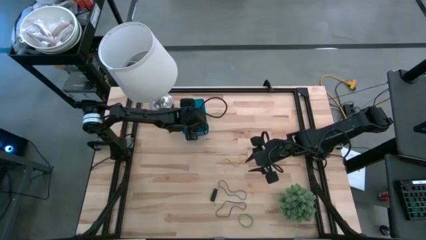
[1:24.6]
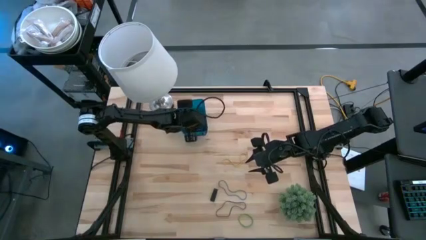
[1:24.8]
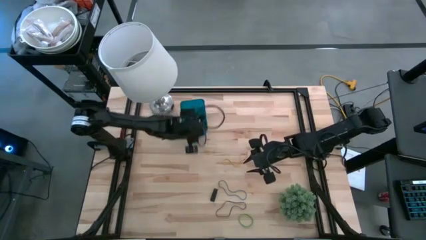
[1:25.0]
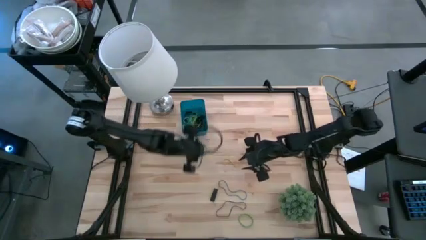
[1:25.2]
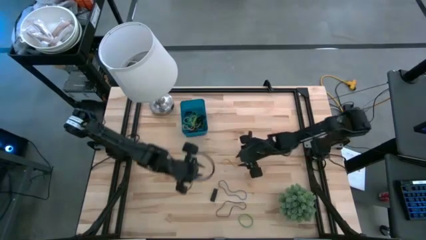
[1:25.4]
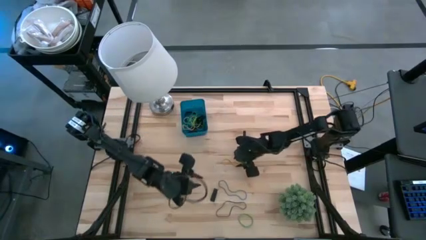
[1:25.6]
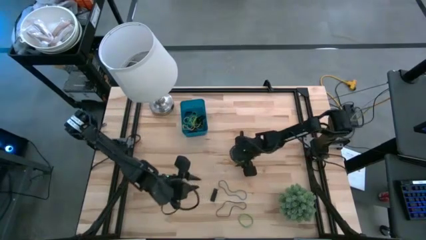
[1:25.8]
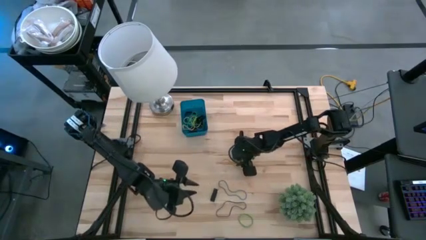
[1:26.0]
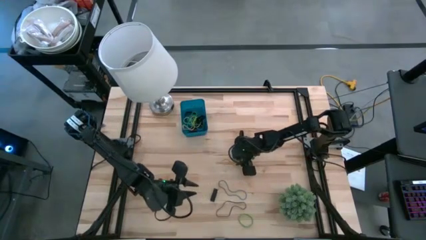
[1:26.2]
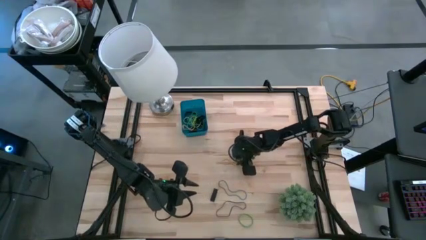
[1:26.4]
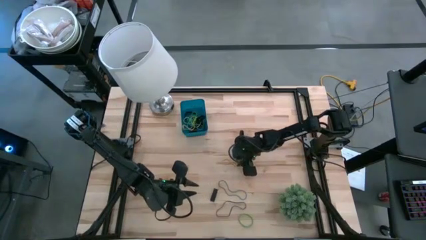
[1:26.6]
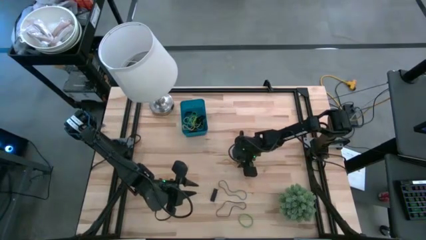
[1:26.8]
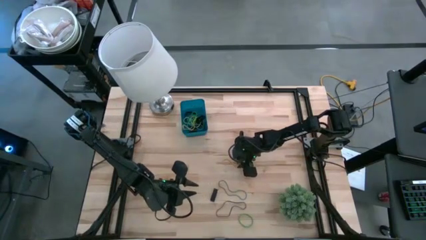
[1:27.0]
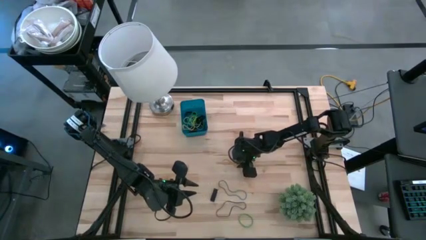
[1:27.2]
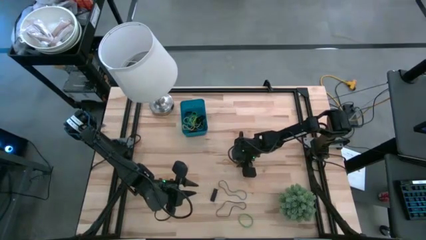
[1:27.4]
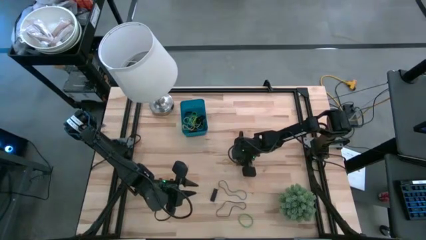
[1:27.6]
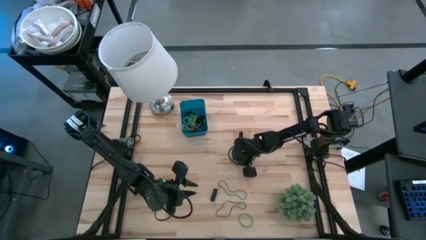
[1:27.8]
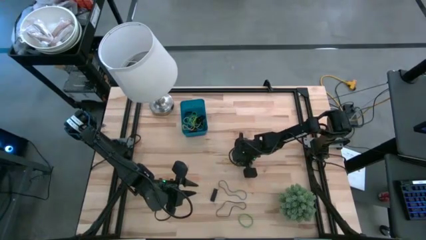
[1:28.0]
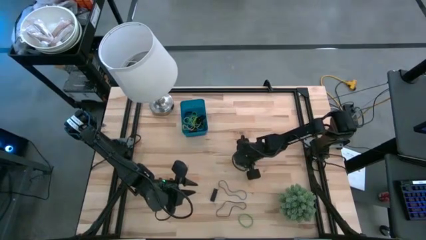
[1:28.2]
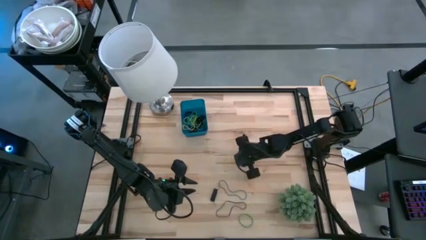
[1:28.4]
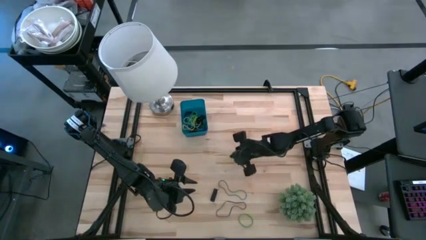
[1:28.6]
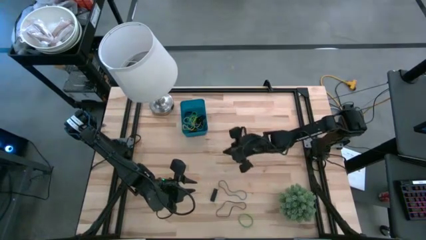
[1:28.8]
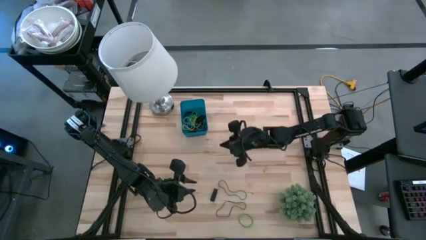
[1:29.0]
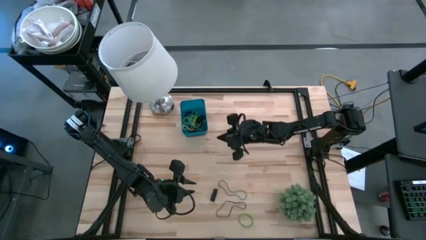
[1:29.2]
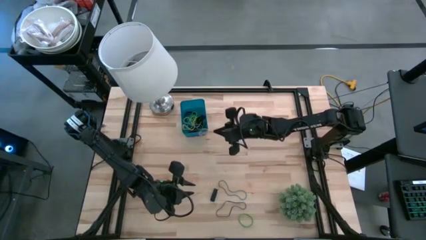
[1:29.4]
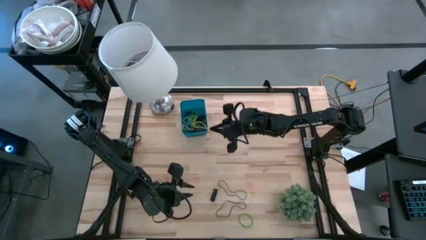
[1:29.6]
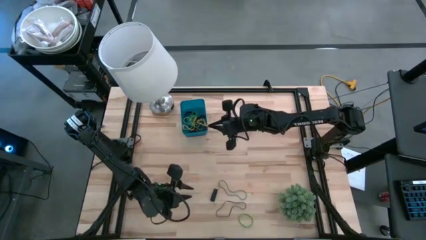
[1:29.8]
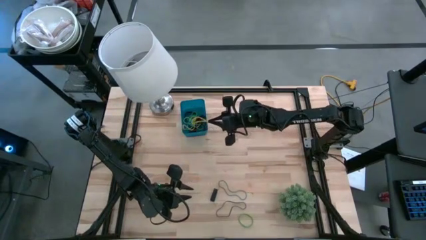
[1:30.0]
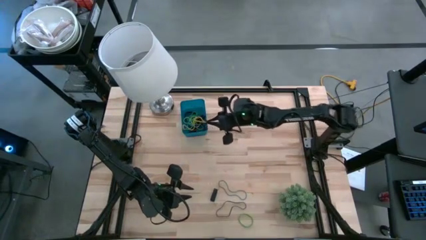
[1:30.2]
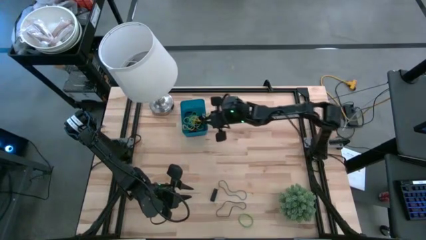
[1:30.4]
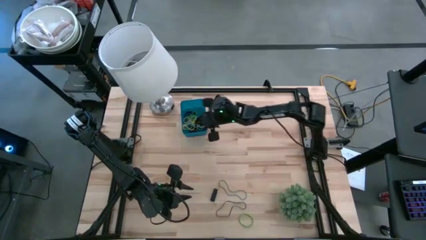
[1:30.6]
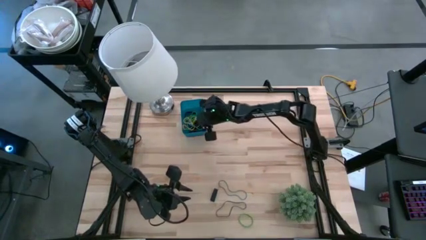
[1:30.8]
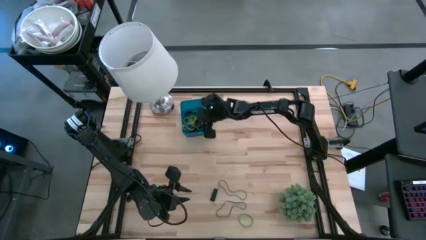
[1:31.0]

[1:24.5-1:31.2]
Task: Pick and place rubber bands into bin
Put the yellow rubber band into the blue bin

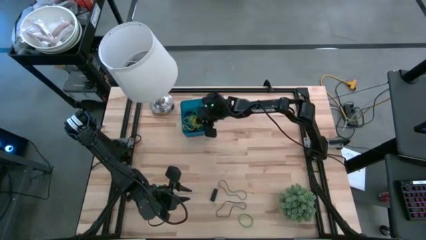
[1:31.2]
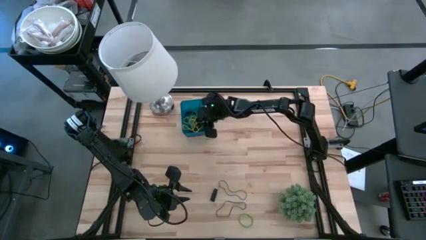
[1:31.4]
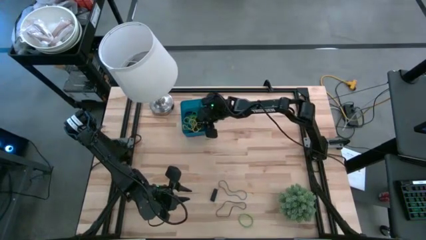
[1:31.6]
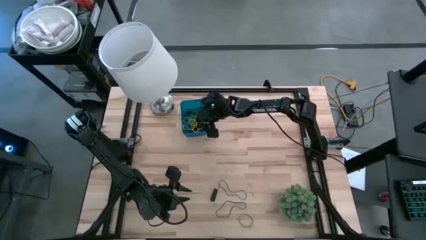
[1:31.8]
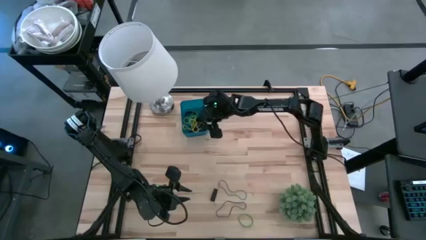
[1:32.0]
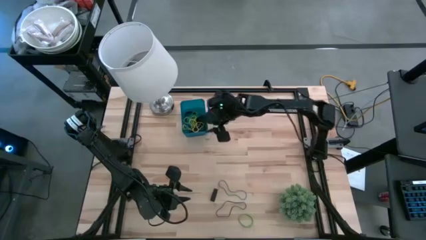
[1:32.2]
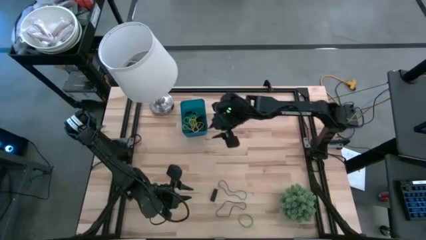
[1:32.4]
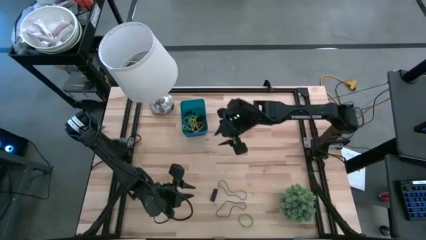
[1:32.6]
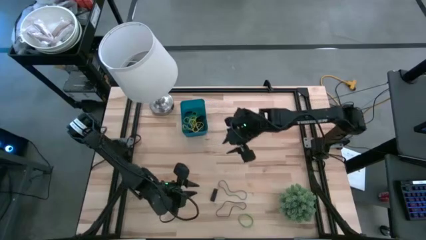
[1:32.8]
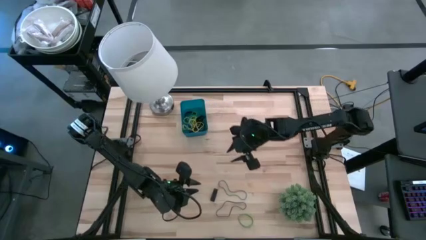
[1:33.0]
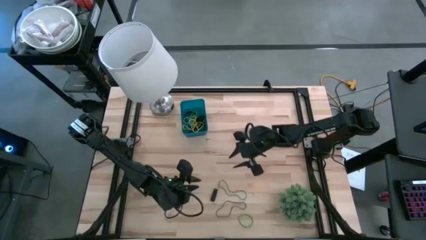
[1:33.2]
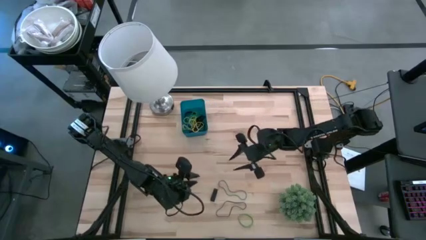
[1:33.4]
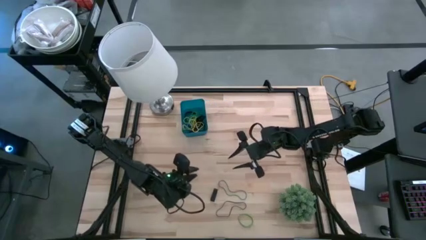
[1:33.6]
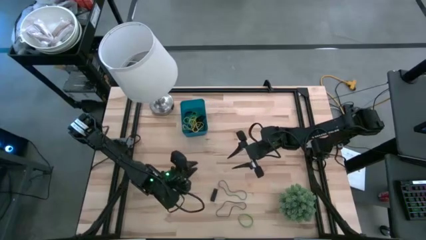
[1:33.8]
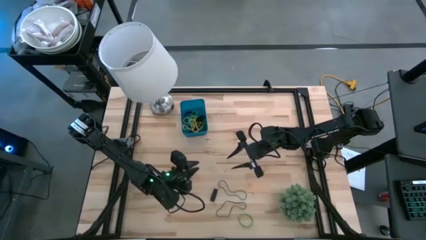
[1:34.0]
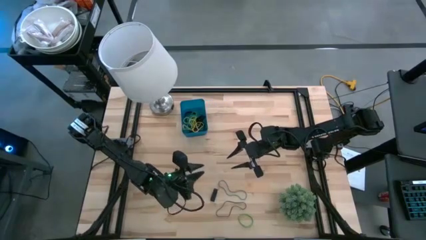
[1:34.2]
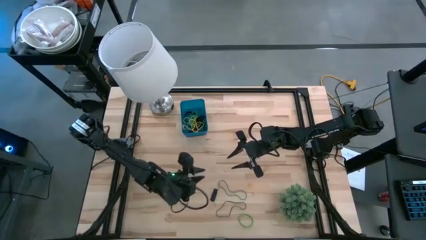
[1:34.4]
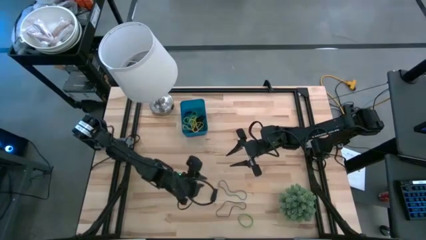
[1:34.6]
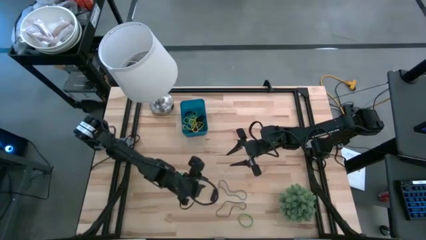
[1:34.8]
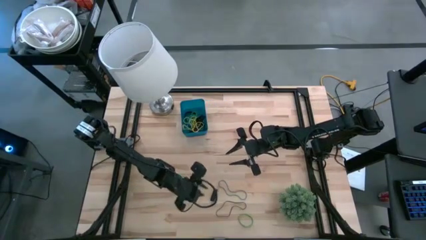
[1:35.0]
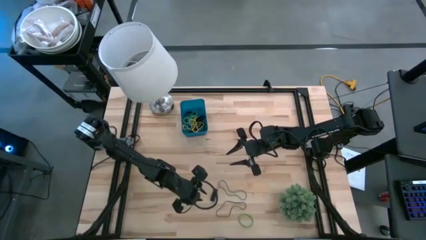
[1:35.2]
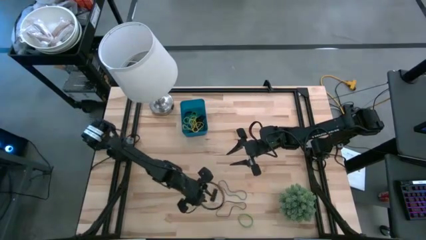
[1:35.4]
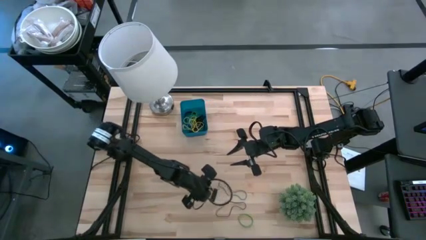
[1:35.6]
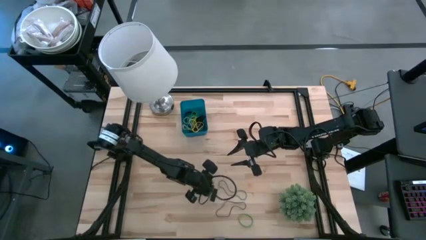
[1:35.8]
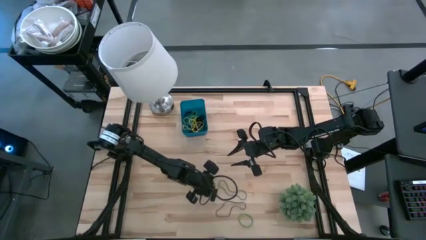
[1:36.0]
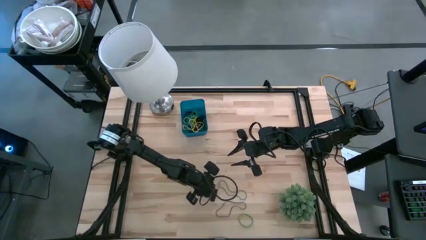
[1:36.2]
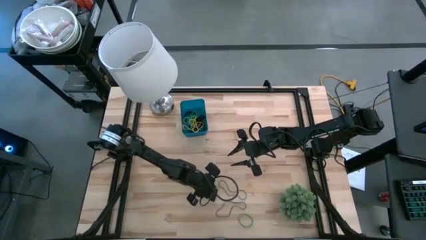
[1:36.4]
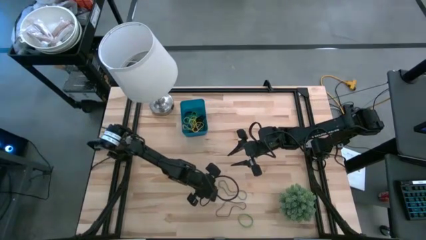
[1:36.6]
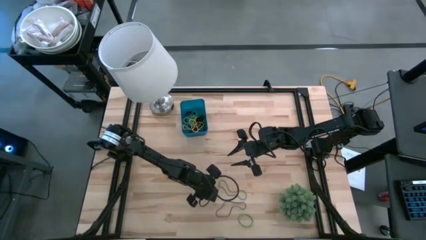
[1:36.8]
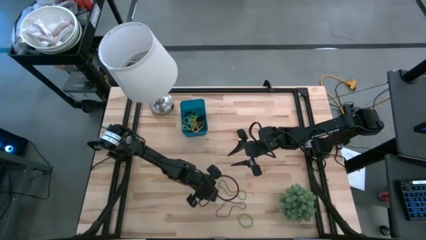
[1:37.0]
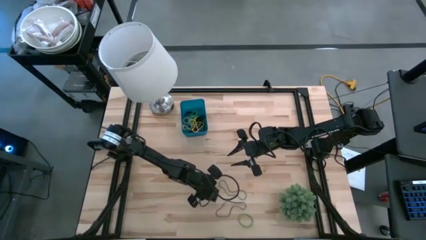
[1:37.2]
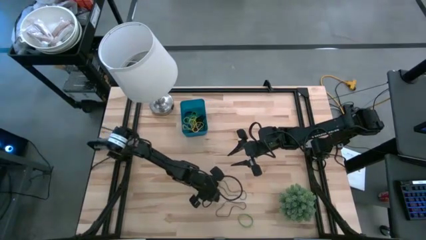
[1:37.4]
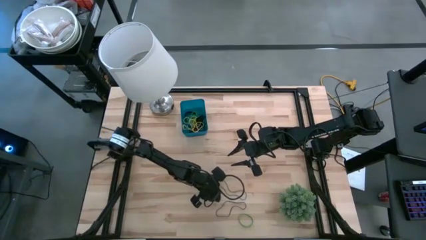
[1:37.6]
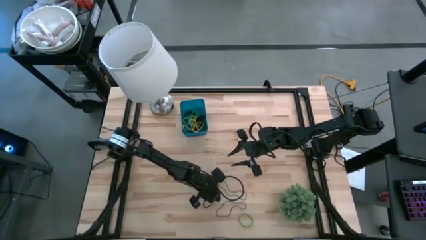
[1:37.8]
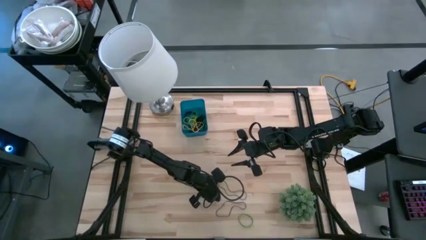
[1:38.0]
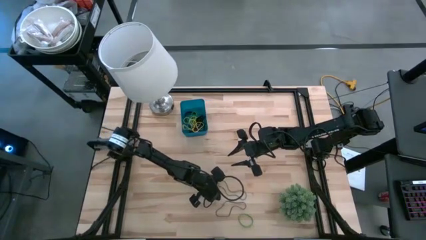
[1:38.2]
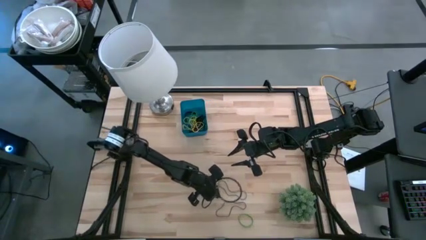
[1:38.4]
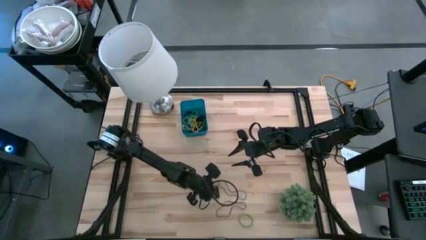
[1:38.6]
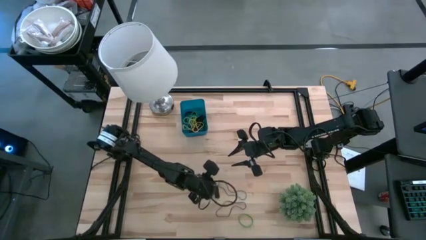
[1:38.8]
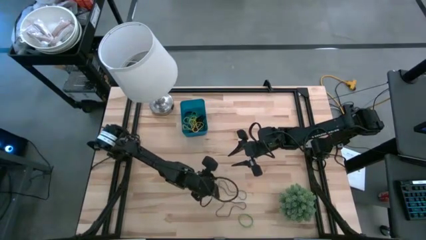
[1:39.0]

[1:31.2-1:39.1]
Put the black rubber band into the blue bin
